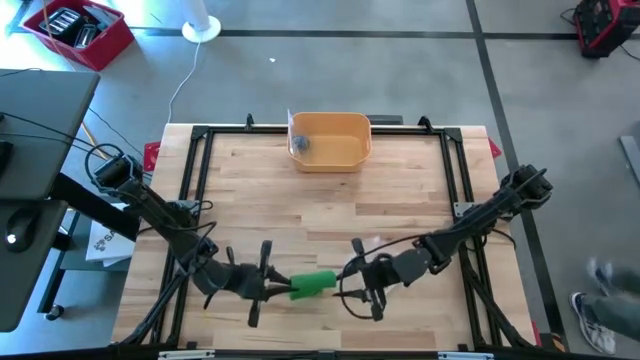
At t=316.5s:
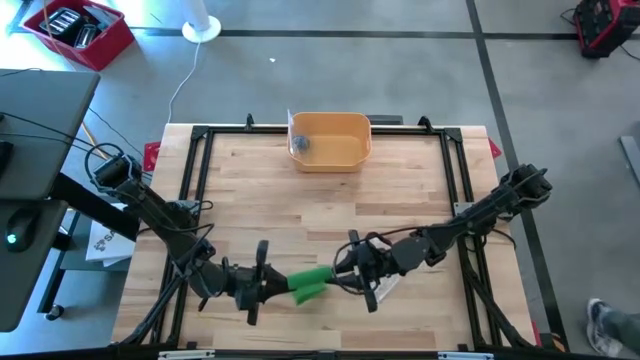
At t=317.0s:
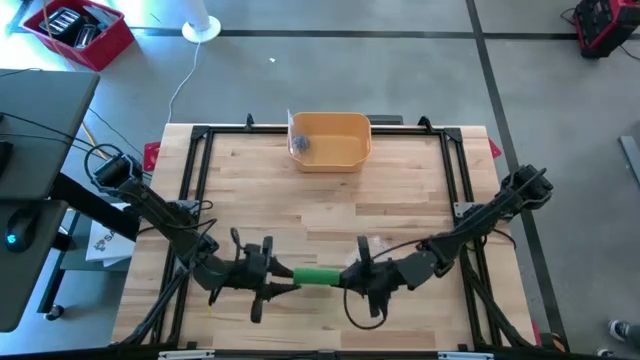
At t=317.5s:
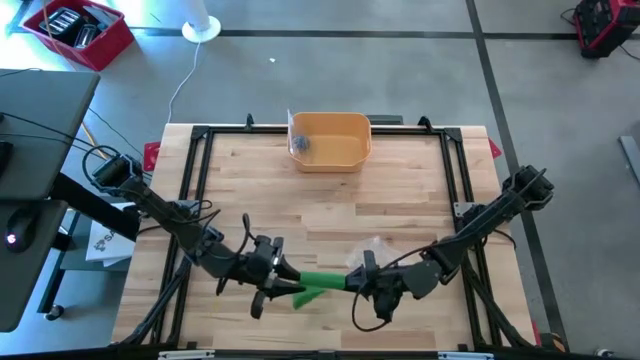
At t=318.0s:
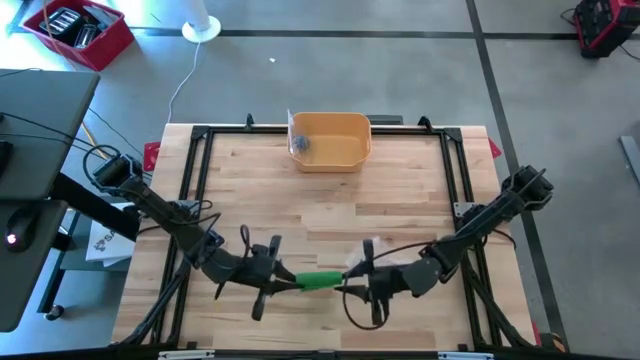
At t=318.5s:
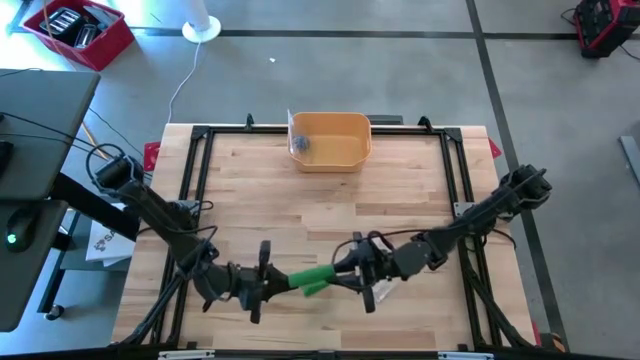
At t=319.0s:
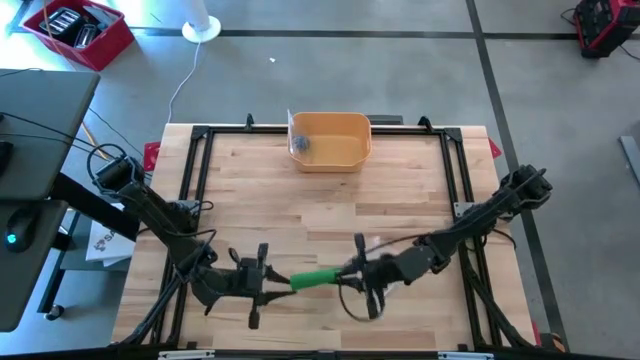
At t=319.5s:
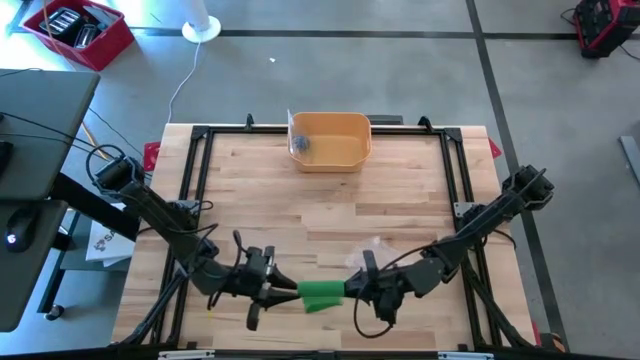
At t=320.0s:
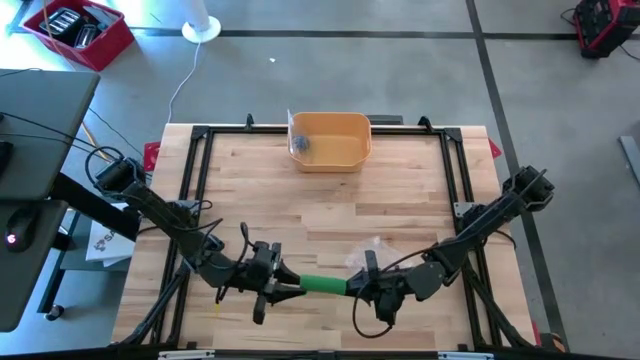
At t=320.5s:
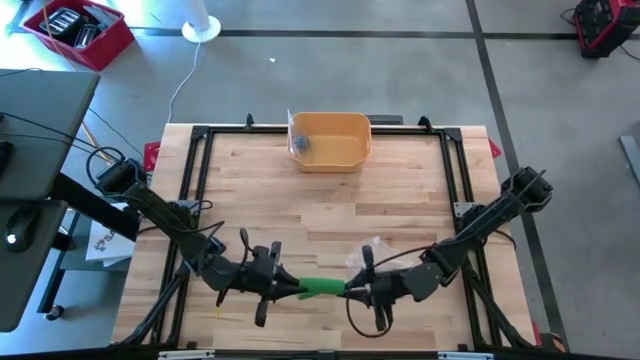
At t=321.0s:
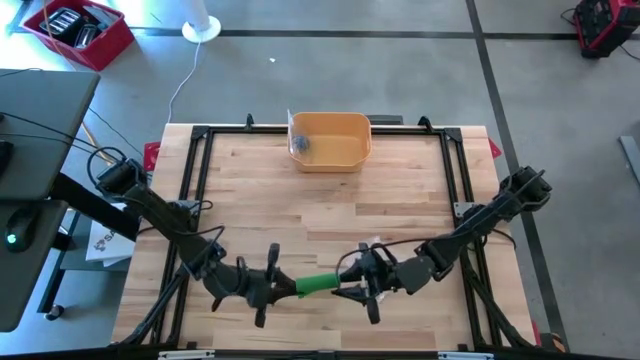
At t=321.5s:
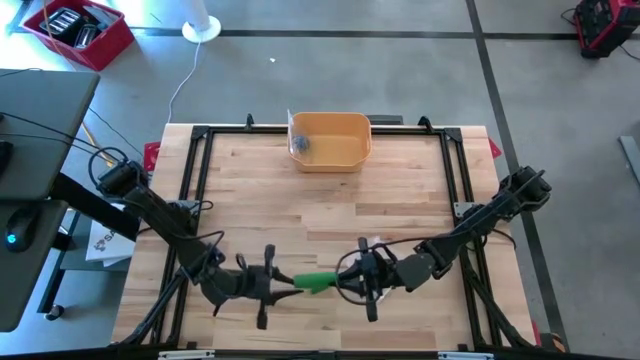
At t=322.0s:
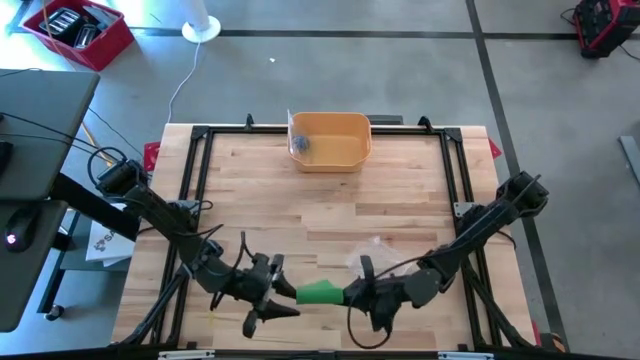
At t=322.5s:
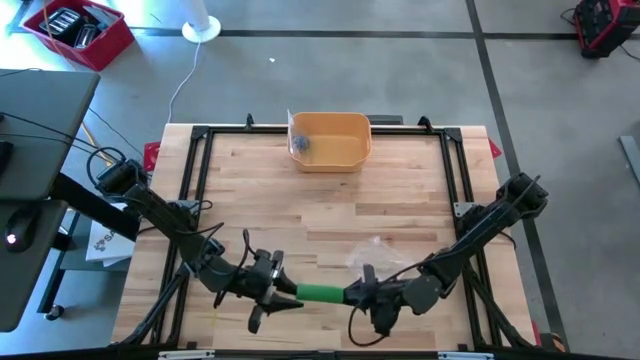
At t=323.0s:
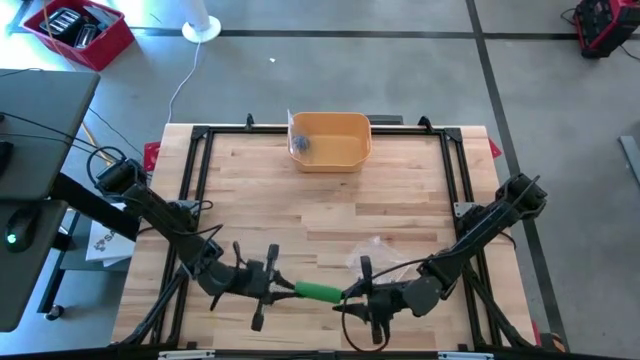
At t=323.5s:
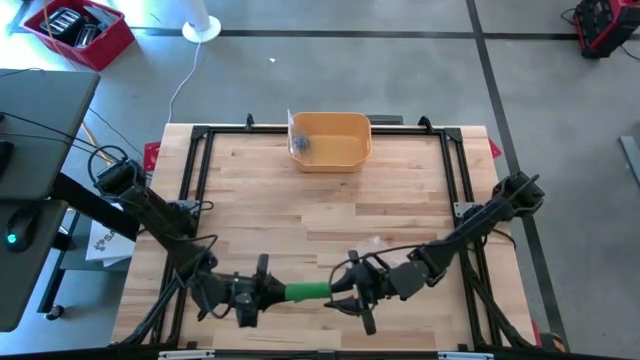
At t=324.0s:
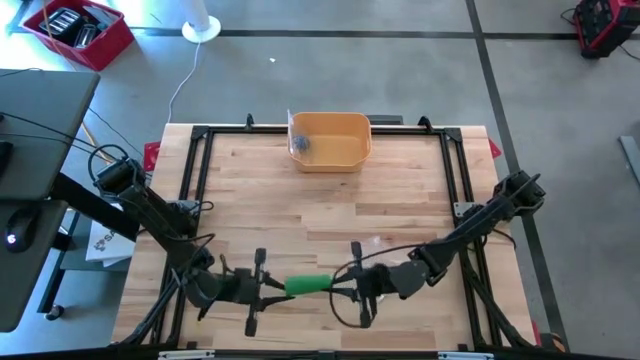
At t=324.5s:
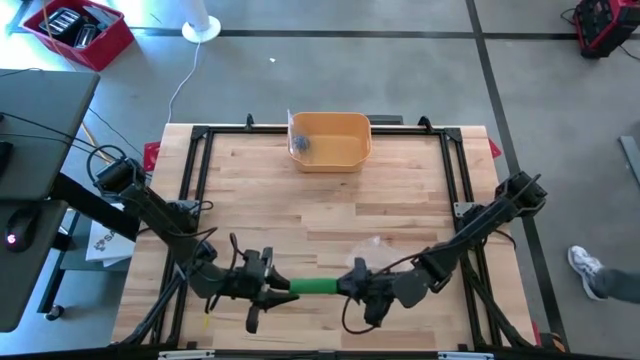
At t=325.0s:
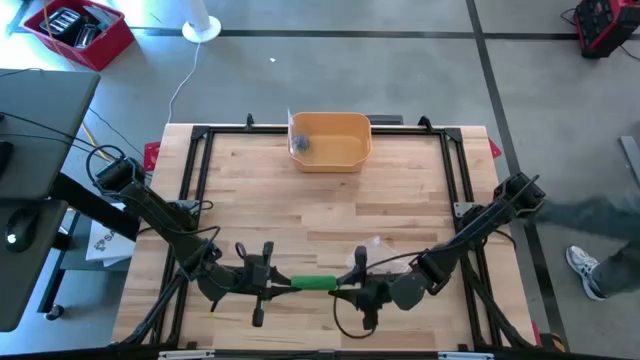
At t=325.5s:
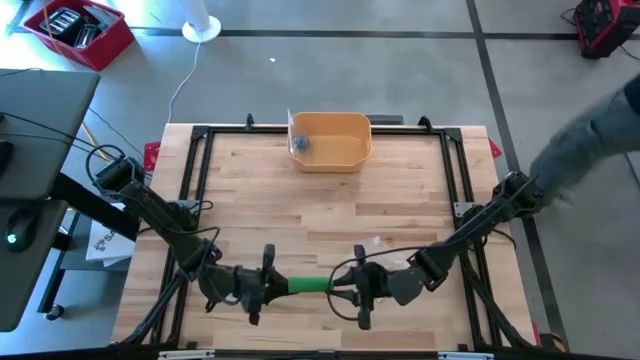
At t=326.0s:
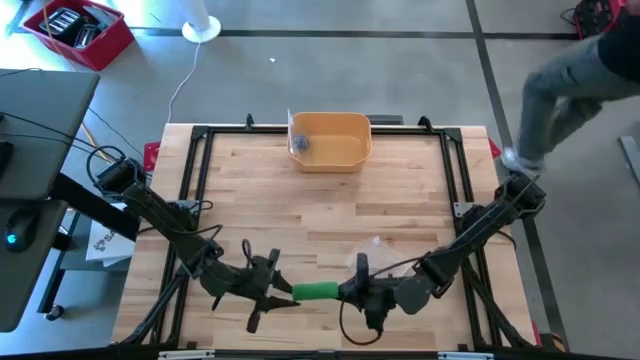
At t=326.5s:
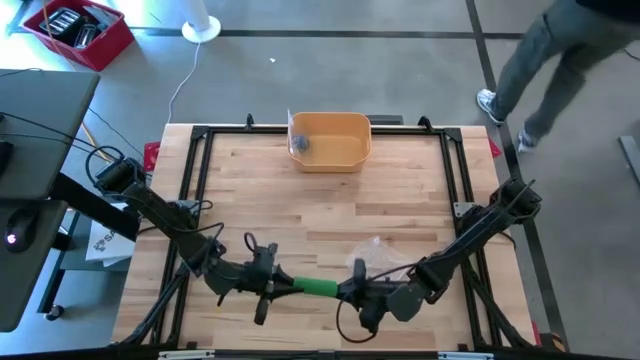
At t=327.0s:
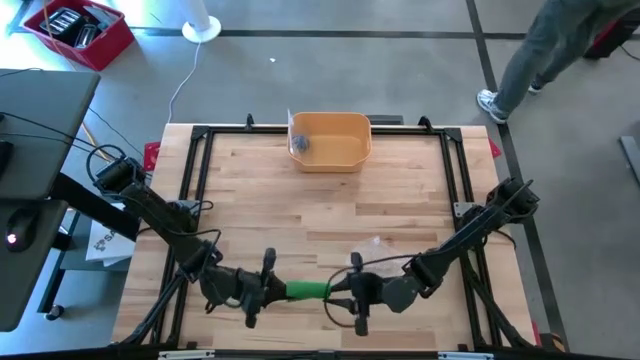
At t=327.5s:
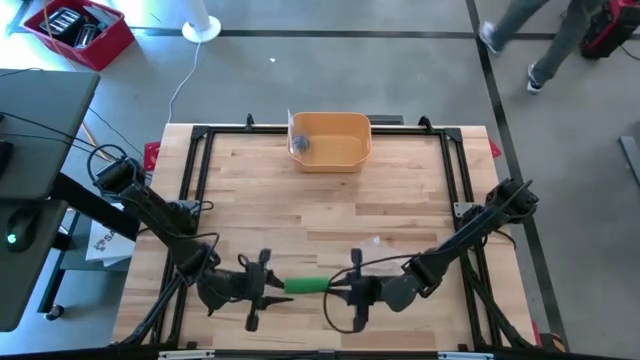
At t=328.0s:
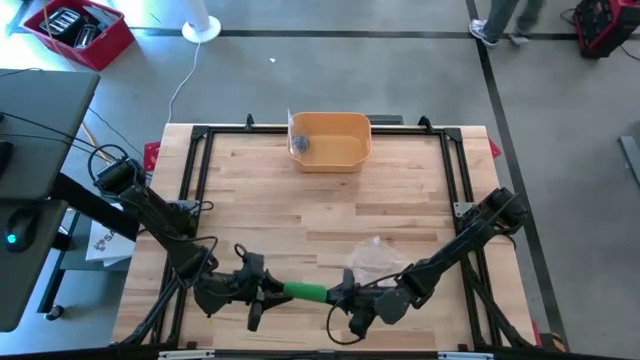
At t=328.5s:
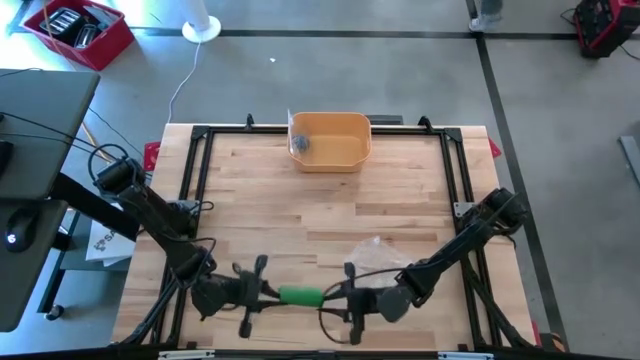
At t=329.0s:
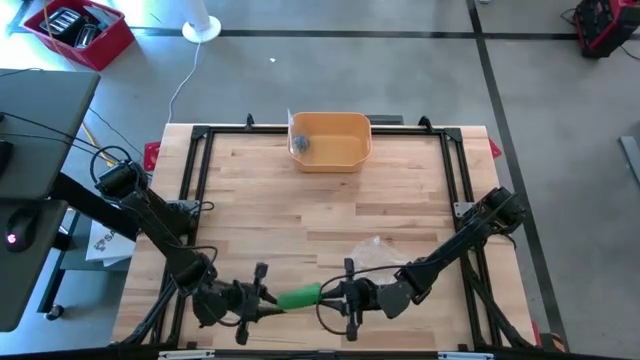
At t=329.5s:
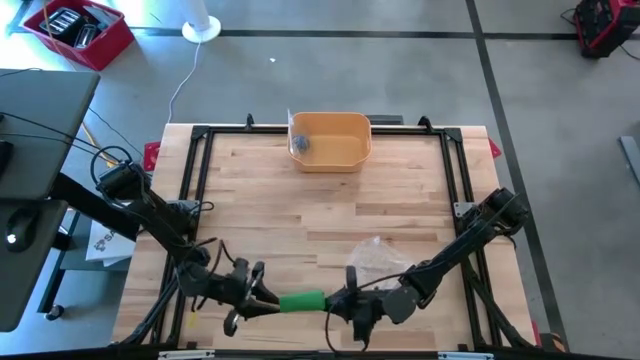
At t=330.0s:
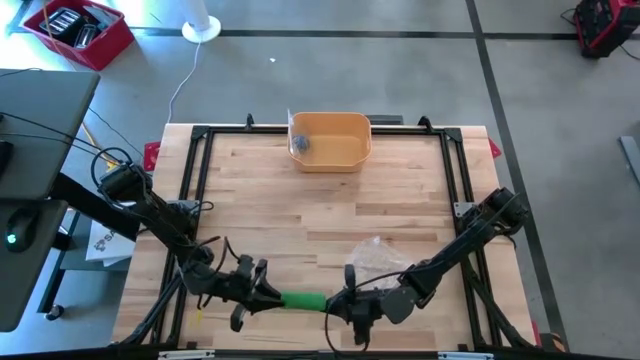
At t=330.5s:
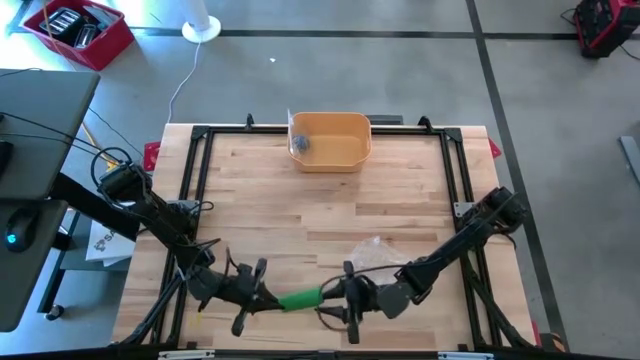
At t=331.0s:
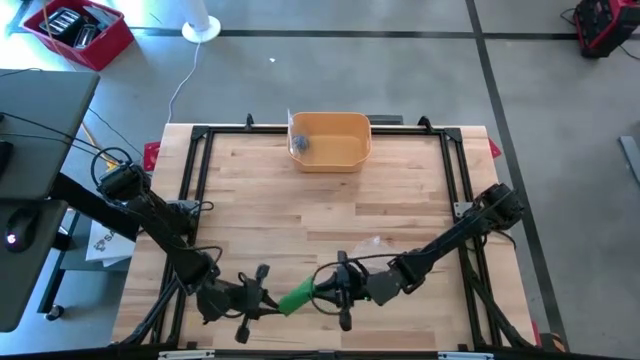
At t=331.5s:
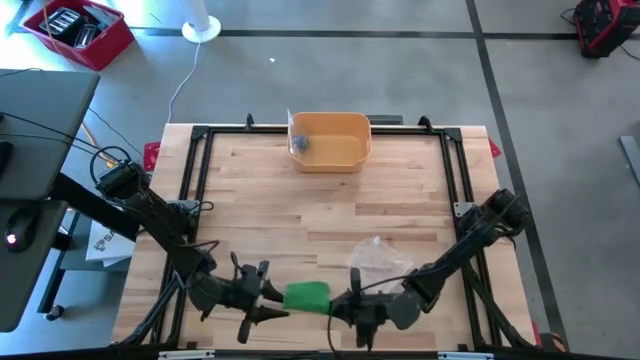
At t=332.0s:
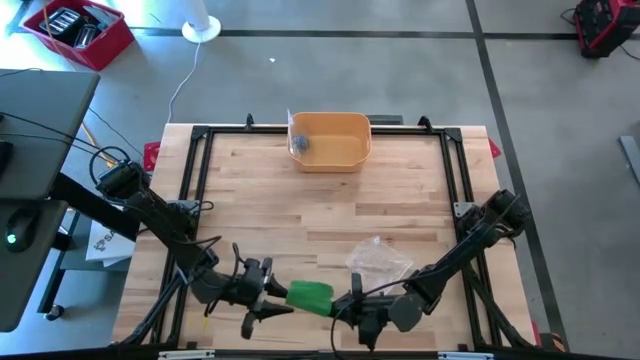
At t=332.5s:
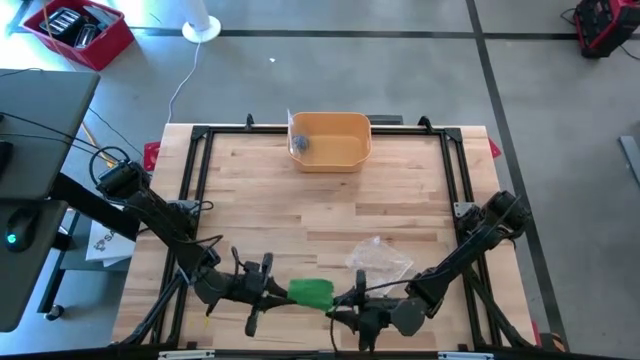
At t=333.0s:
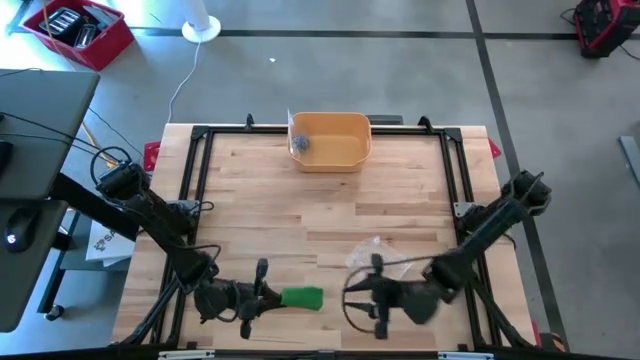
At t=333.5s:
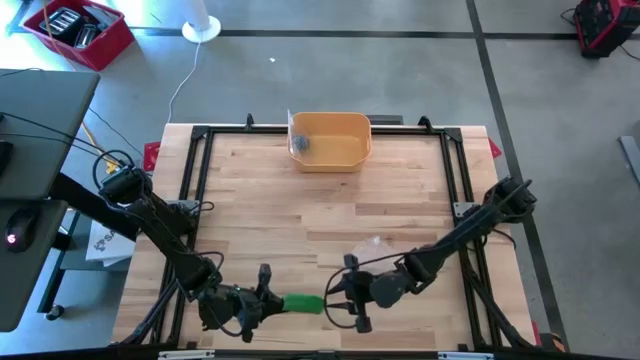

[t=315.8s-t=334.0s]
Task: Roll bandage
Roll the green bandage

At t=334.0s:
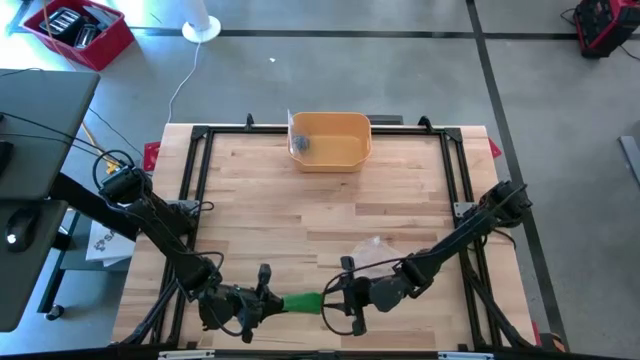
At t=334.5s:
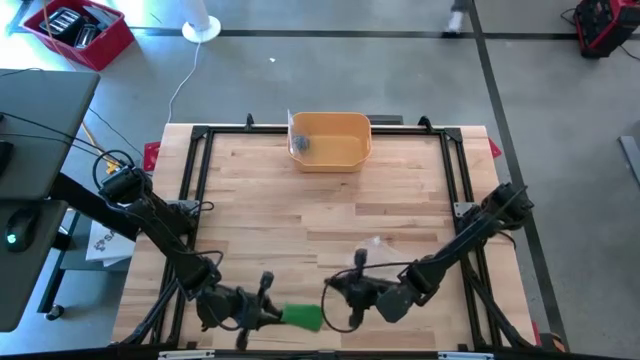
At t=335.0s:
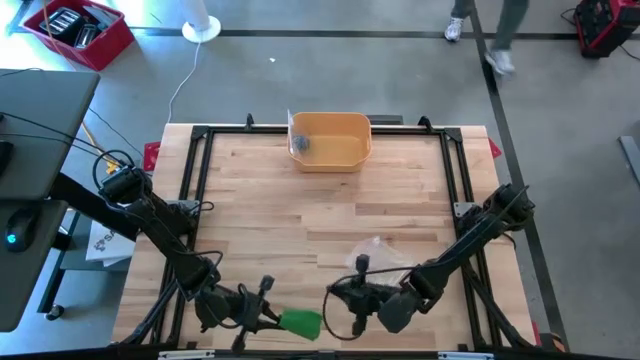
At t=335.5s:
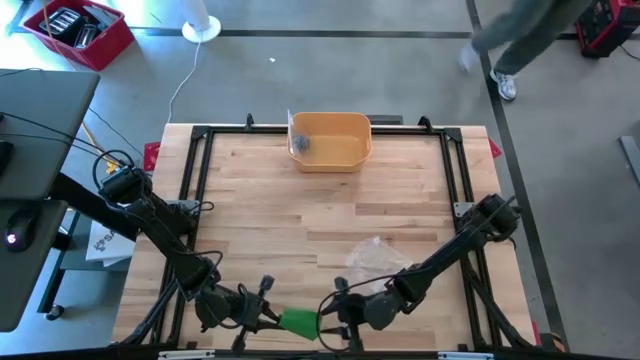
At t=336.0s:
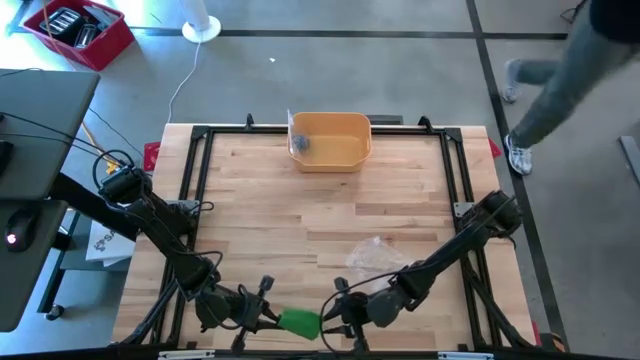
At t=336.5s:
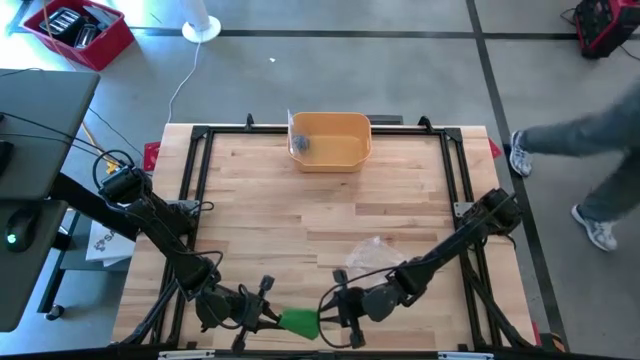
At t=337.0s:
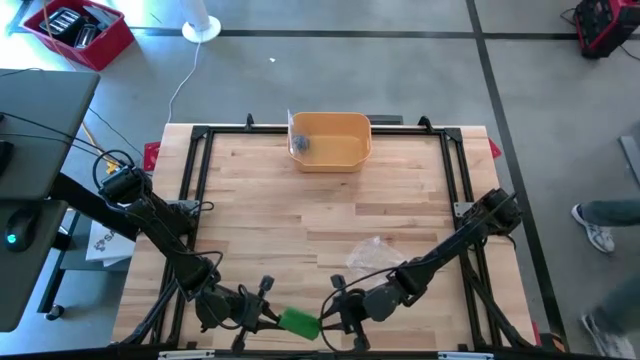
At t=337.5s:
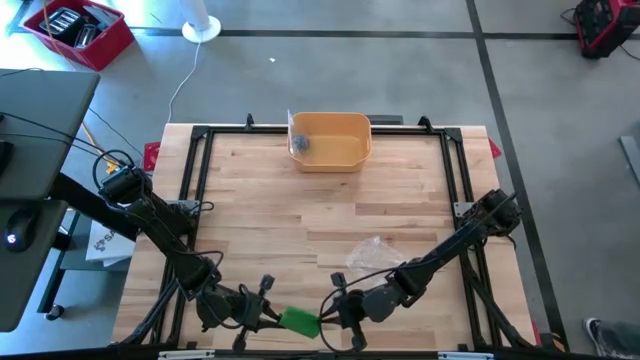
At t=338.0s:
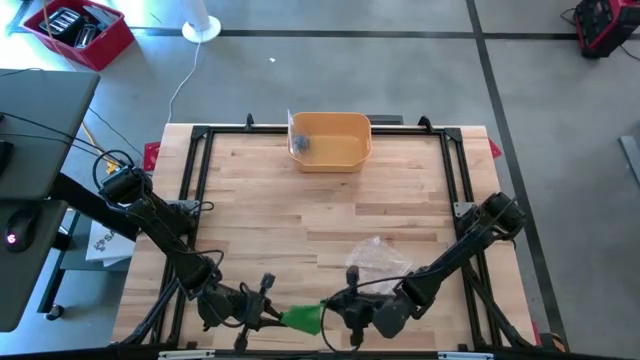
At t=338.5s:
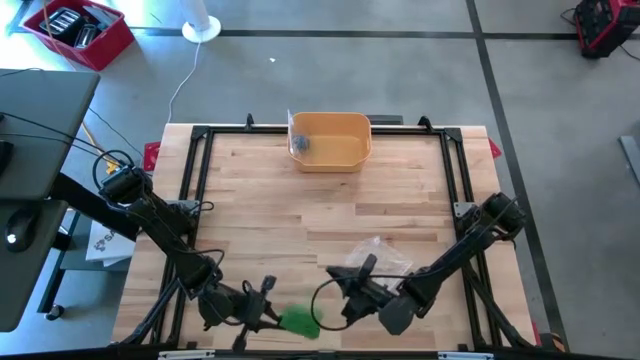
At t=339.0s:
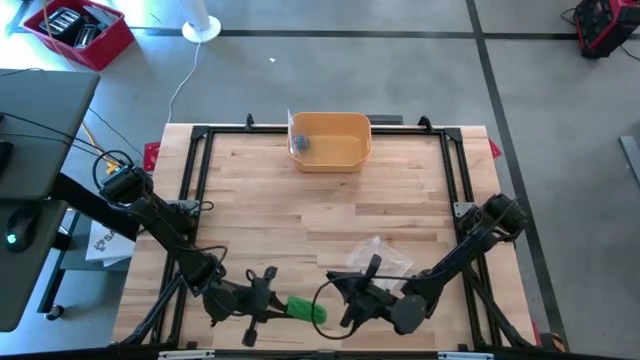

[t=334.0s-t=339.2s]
Roll the green bandage
